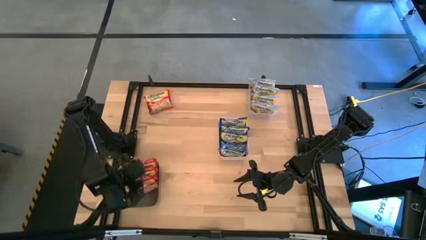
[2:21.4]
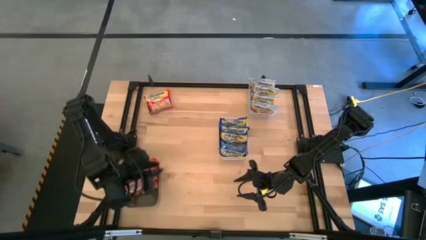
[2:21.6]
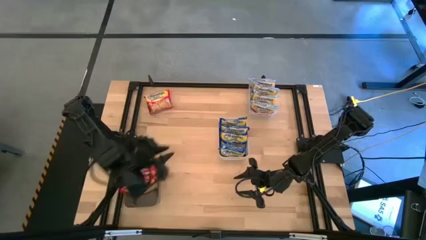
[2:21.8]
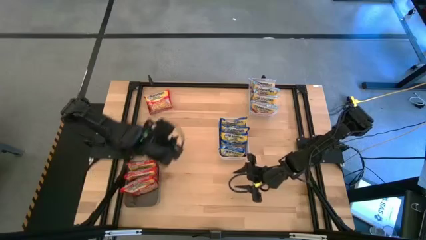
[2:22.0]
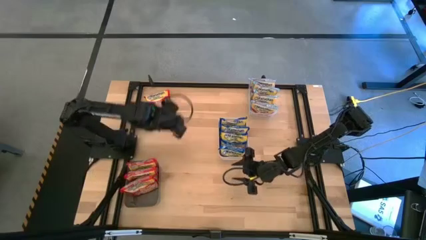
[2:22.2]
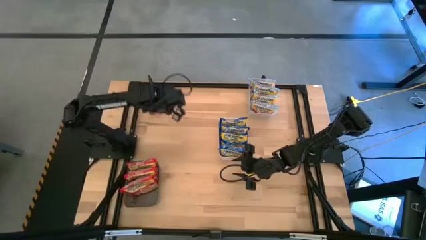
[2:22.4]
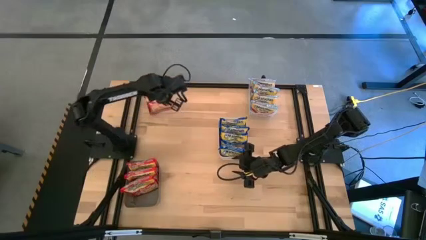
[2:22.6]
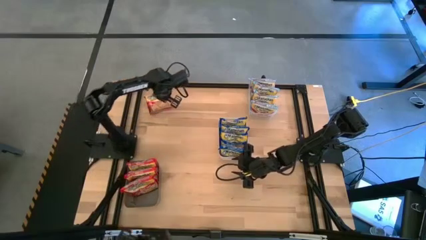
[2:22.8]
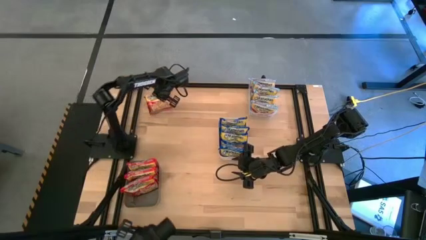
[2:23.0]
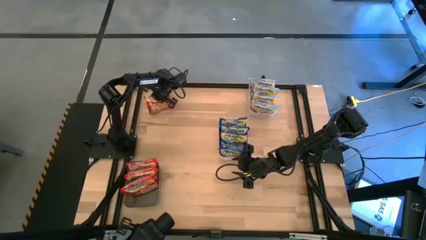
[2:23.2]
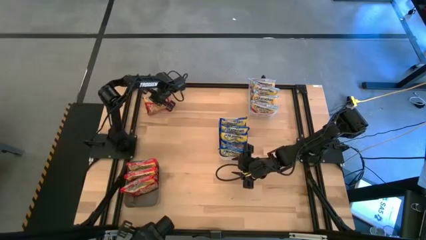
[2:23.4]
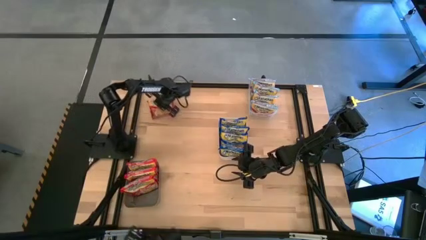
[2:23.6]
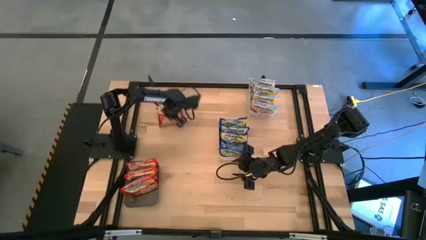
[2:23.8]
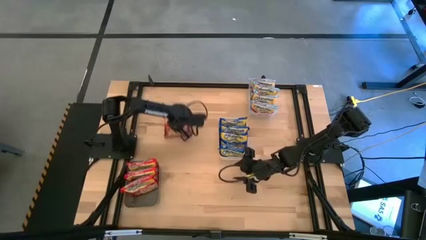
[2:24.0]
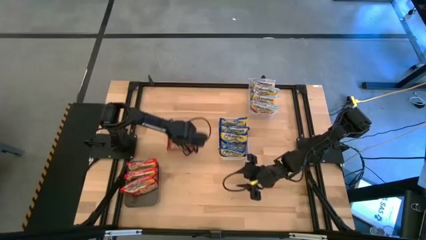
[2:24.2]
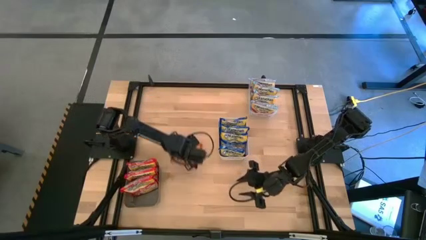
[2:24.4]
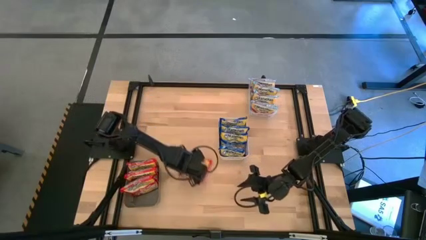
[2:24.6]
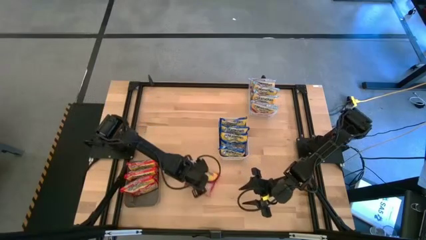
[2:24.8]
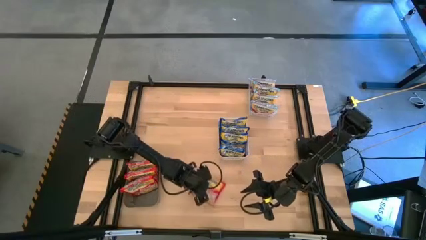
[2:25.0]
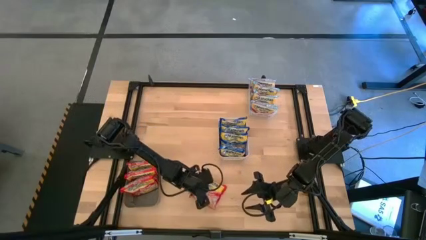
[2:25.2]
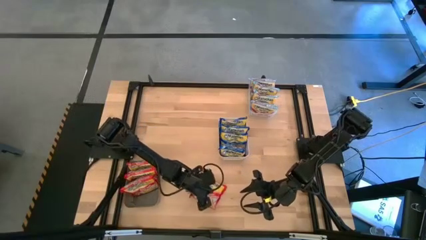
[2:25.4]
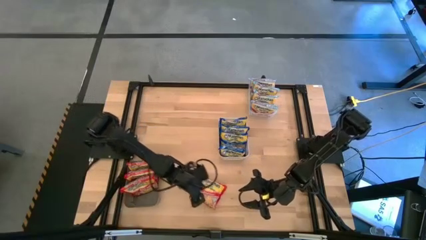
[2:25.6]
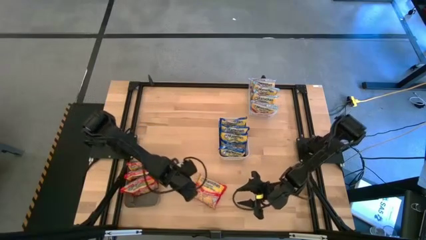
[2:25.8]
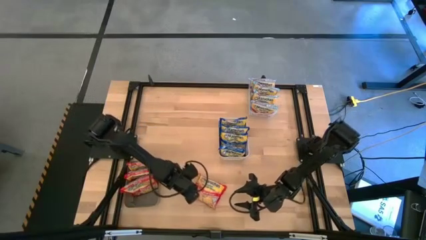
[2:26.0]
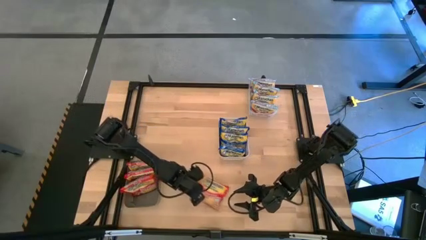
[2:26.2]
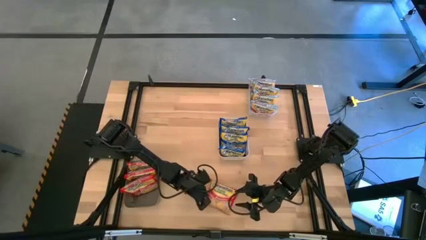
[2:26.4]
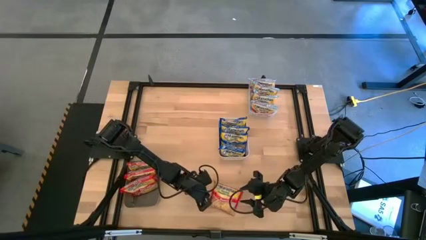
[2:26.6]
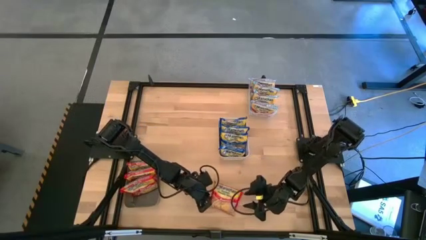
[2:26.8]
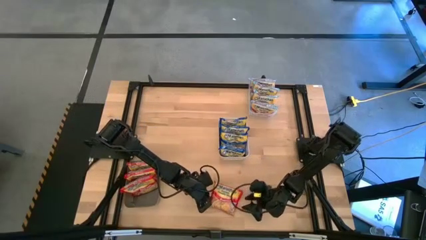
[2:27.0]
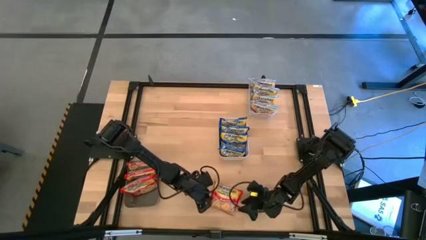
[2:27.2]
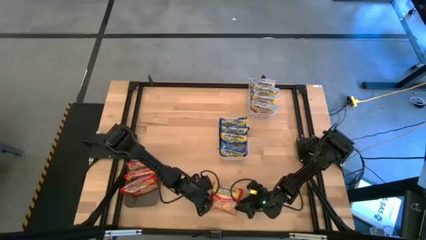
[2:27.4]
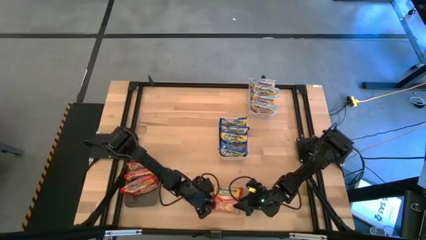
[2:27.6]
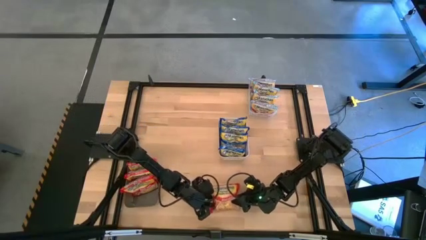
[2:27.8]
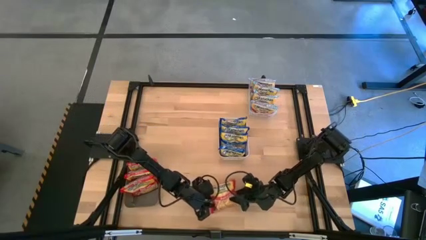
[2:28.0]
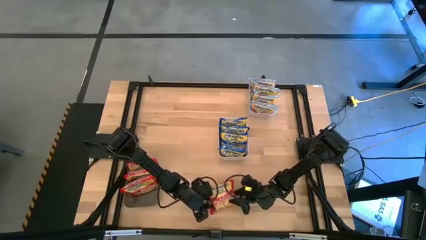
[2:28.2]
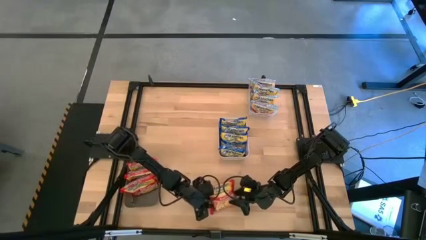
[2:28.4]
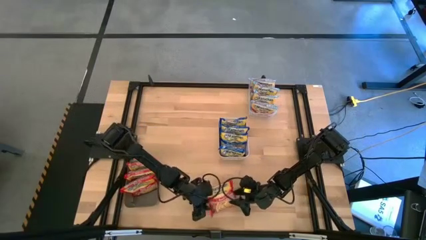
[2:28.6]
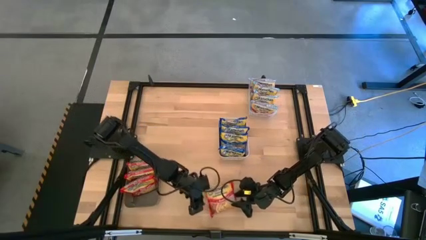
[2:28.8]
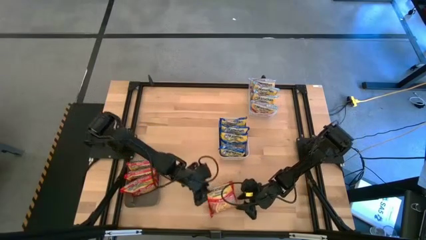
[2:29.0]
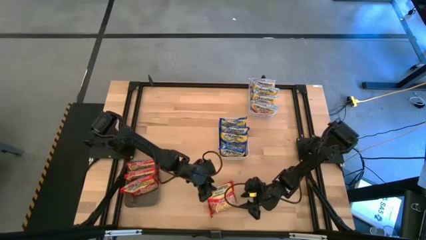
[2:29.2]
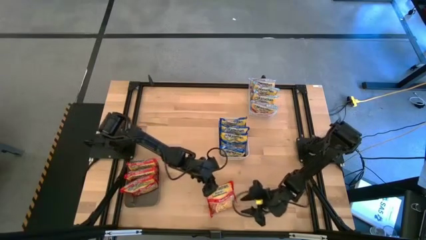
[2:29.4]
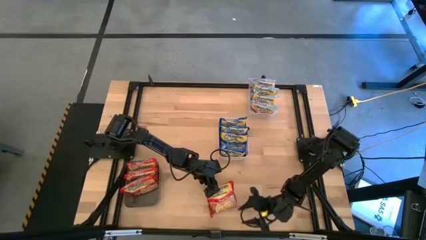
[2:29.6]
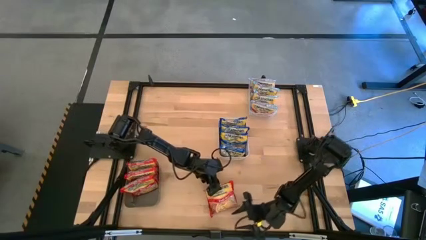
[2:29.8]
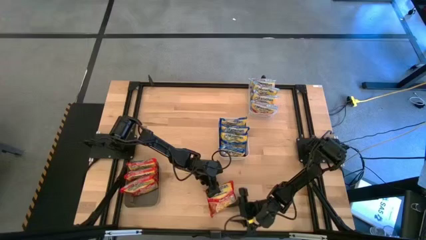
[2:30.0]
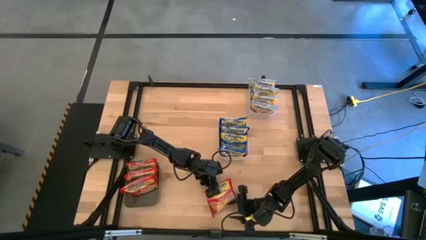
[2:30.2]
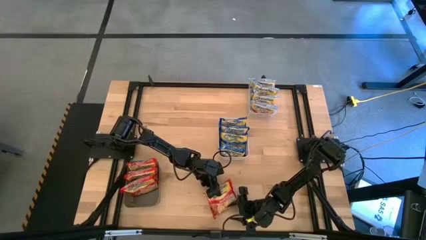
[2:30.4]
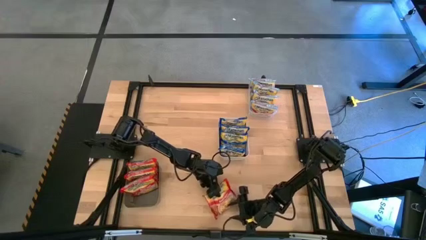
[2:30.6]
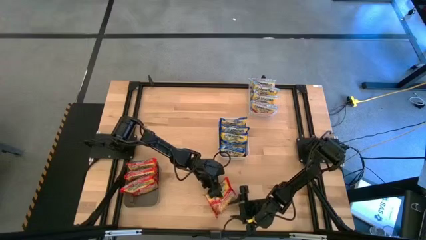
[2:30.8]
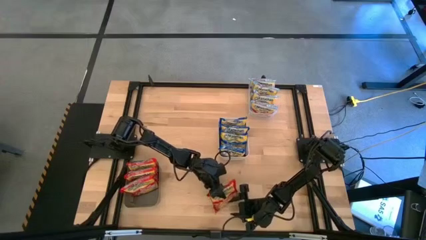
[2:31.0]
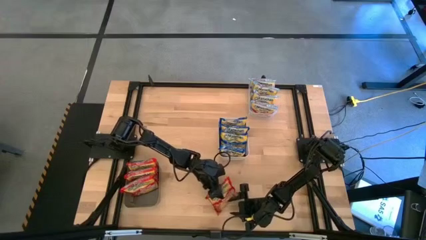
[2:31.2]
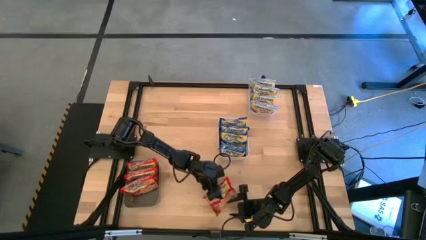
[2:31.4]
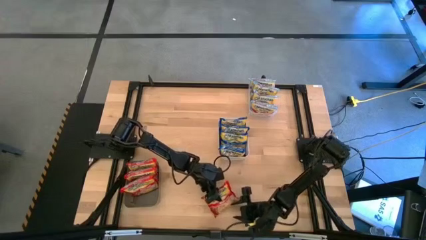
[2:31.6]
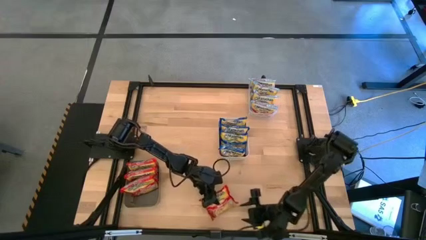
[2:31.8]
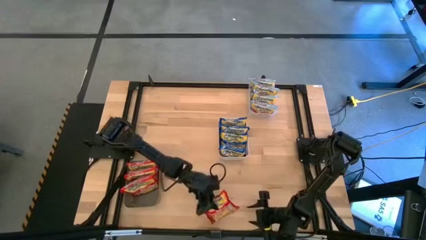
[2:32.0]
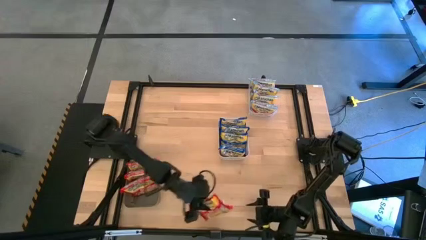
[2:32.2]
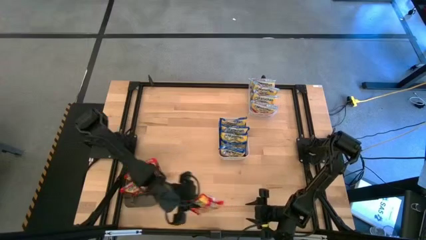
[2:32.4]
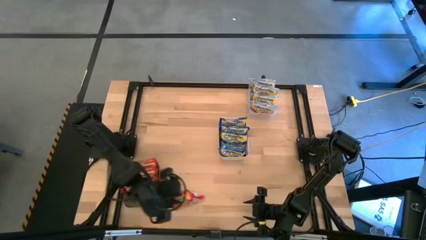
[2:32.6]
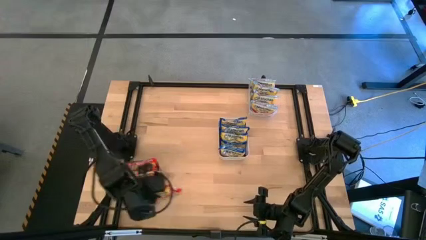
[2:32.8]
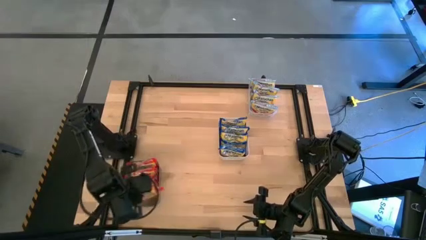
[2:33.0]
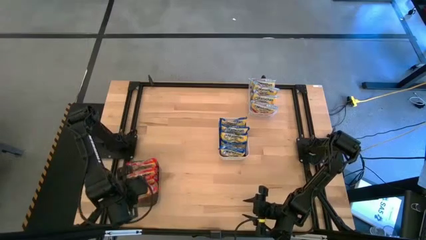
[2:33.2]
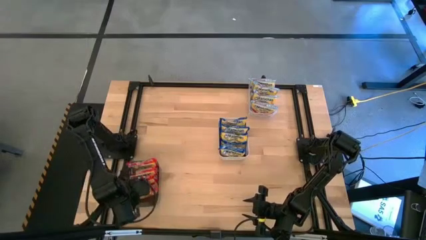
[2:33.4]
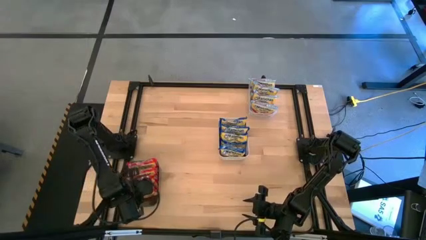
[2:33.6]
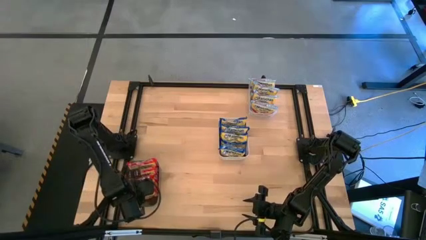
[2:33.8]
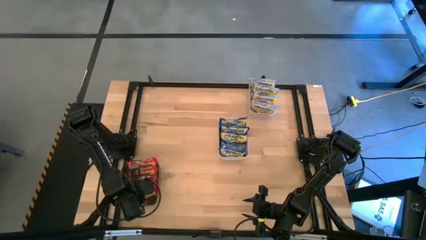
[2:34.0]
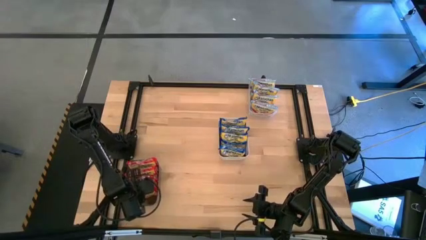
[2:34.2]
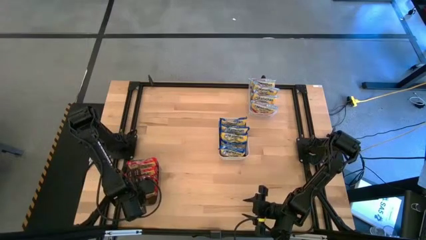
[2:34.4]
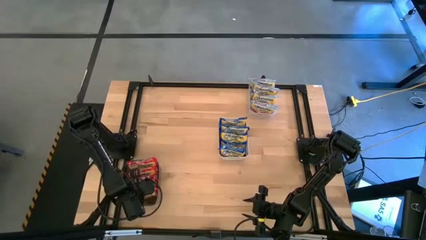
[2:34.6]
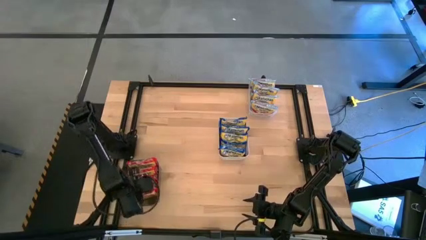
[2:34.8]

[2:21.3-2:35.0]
Task: Sort Maruchan noodles
Put the red noodle pack in the black bin

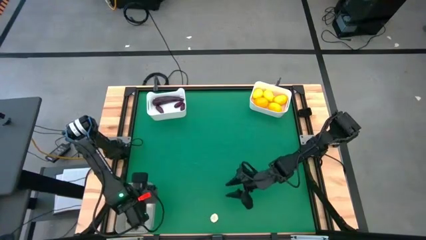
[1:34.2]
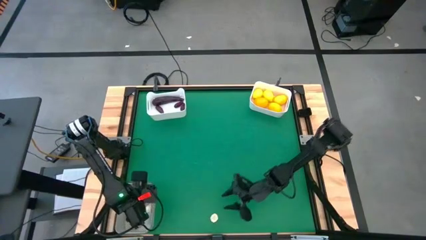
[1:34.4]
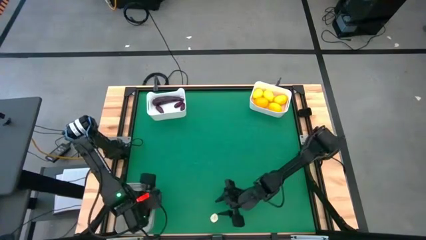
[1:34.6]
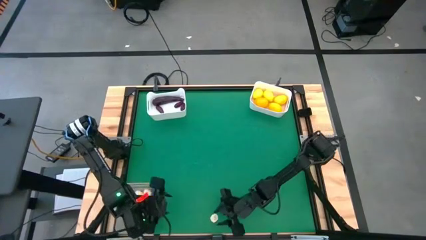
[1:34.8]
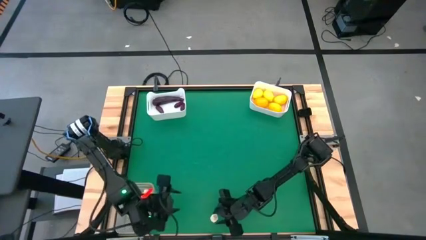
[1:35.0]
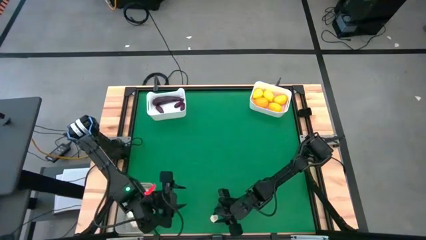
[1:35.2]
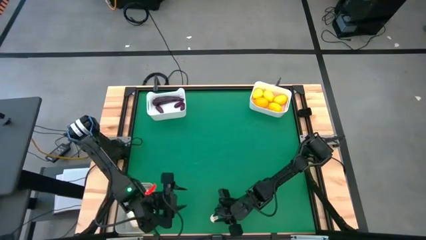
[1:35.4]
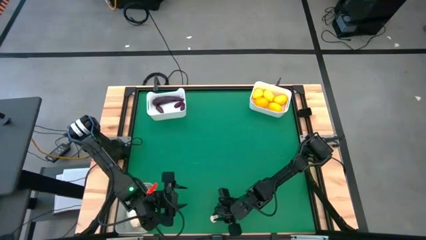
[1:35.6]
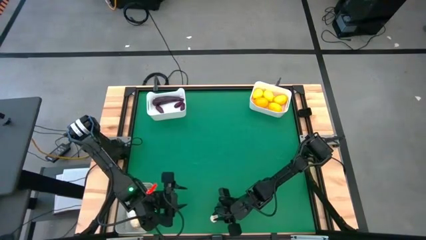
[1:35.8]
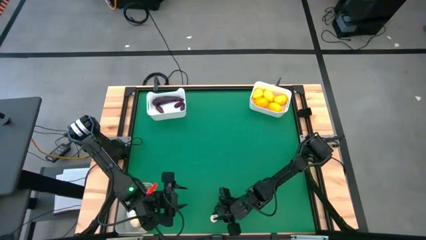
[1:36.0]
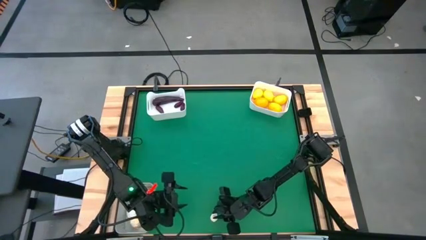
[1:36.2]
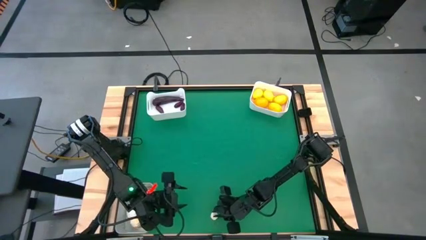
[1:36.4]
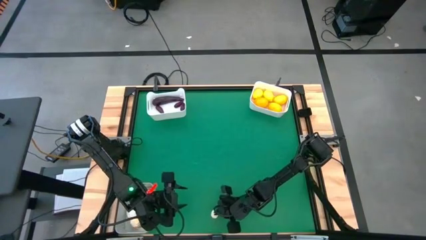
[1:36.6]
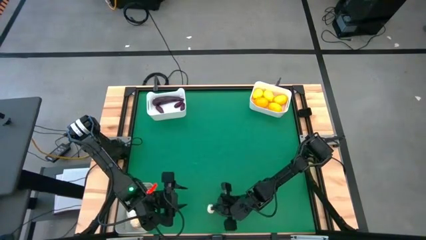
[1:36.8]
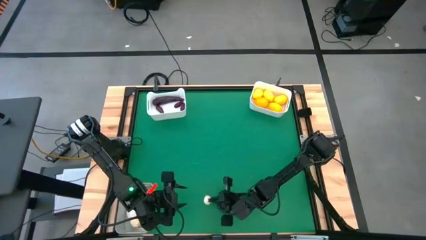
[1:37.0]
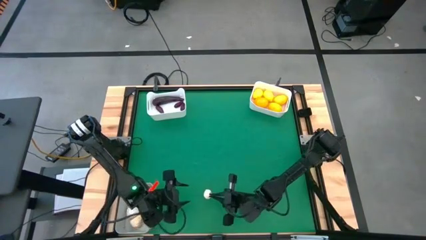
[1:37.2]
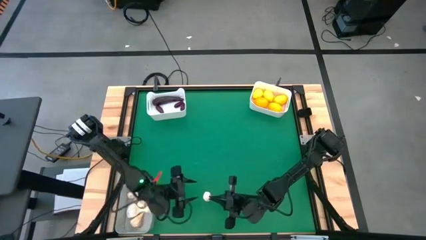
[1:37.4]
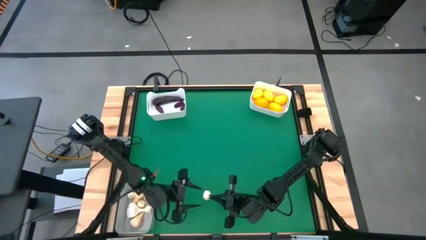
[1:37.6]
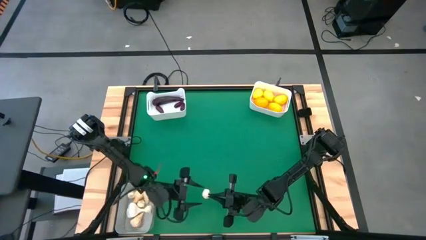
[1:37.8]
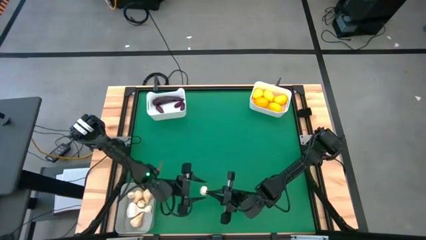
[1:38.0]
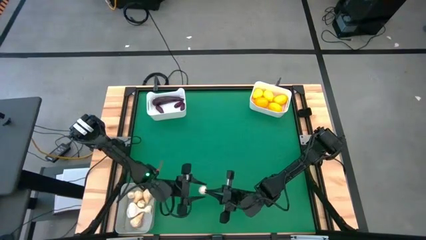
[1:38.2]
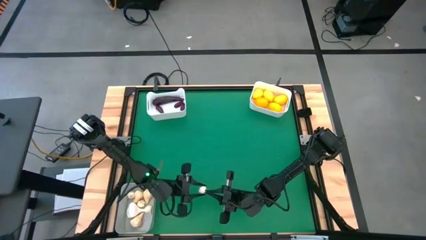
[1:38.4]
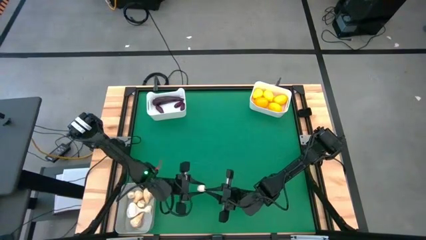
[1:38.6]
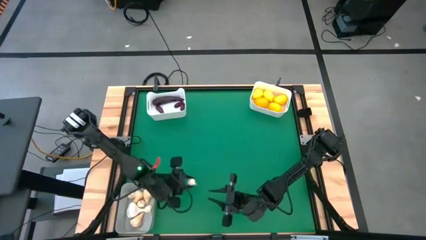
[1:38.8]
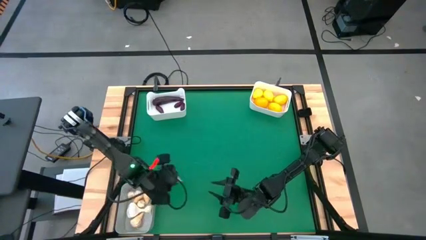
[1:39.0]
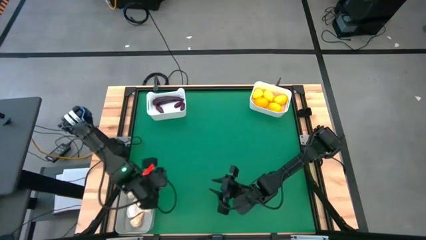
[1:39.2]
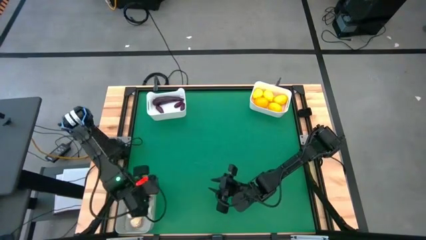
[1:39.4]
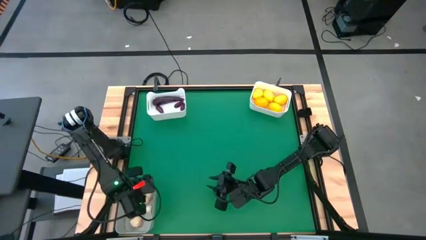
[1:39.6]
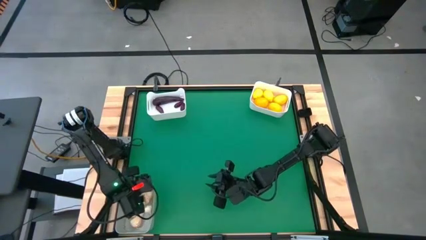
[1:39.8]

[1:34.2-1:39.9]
Task: Sort produce into baskets
Put the white garlic into the gray bin
